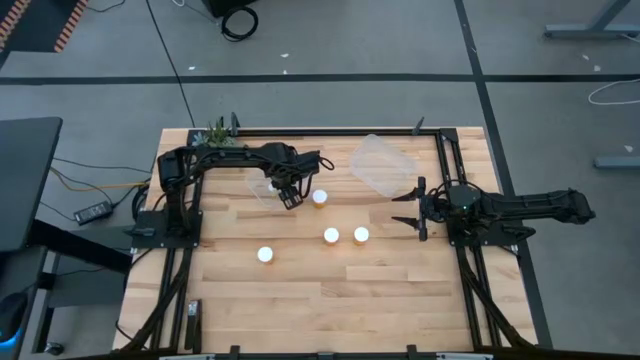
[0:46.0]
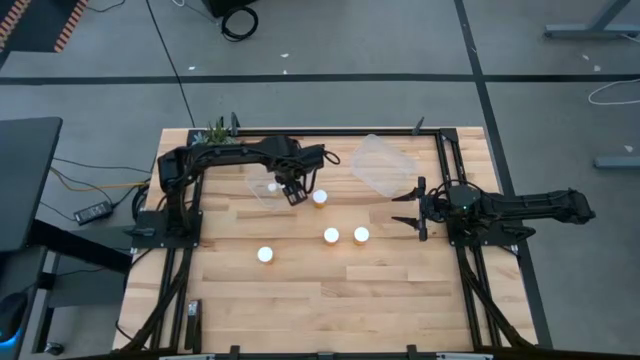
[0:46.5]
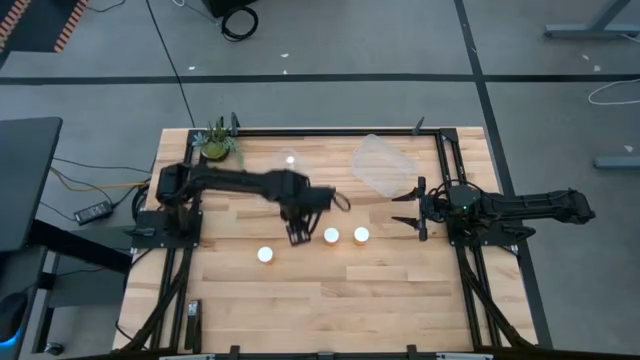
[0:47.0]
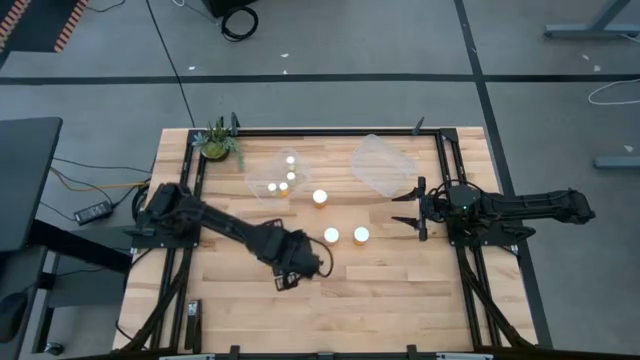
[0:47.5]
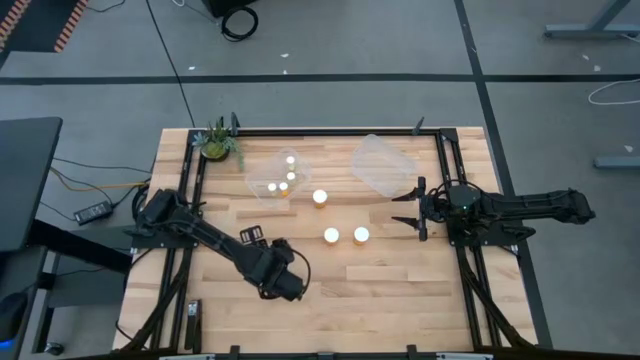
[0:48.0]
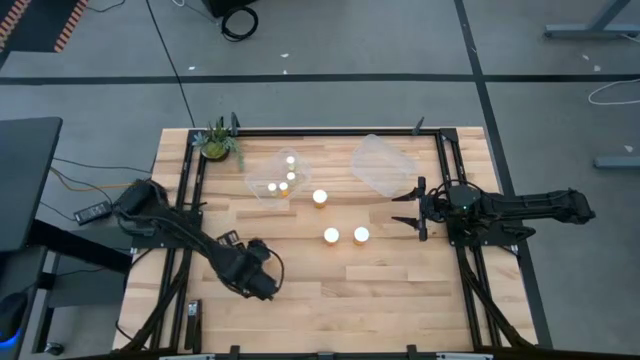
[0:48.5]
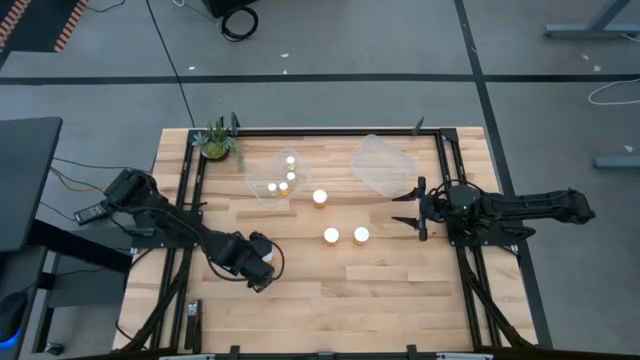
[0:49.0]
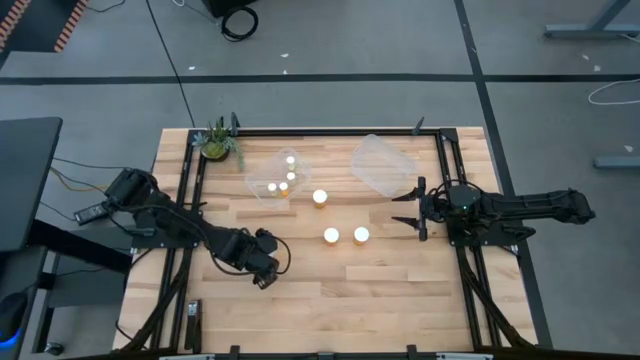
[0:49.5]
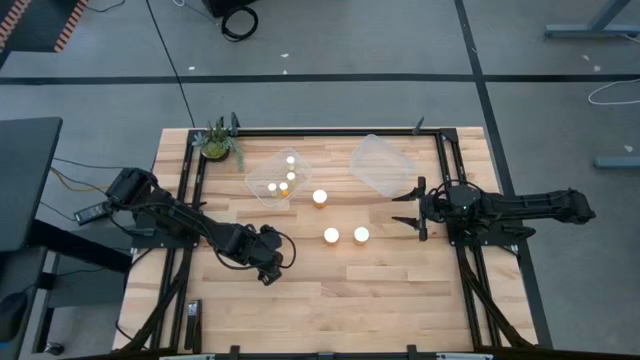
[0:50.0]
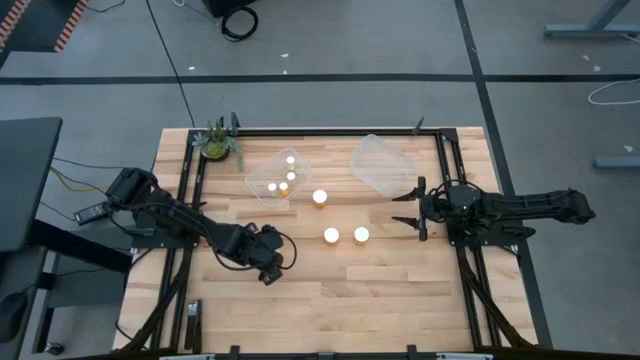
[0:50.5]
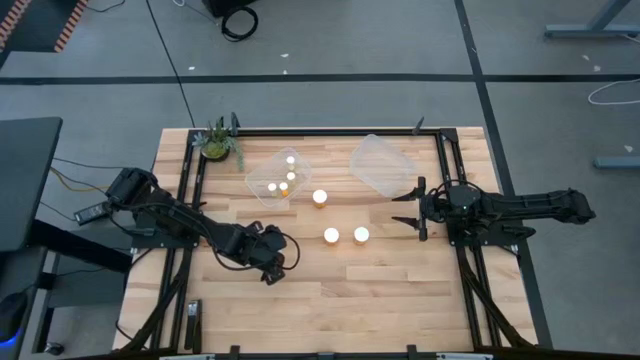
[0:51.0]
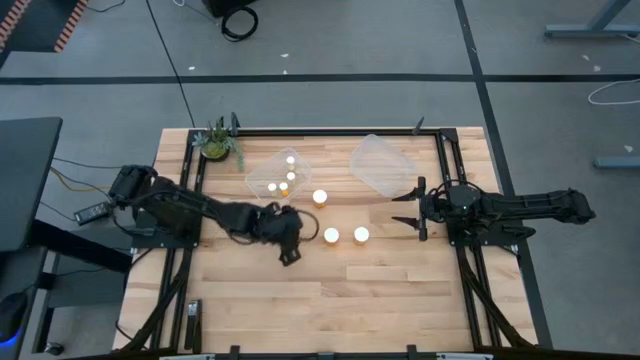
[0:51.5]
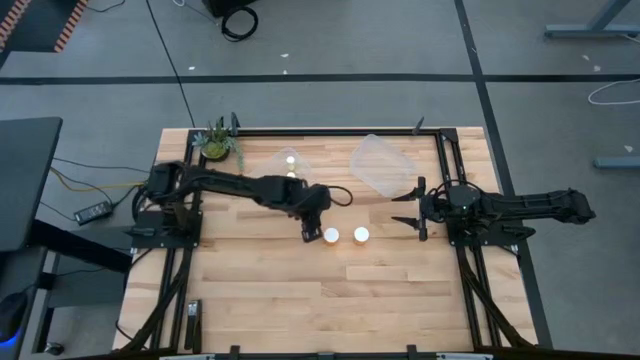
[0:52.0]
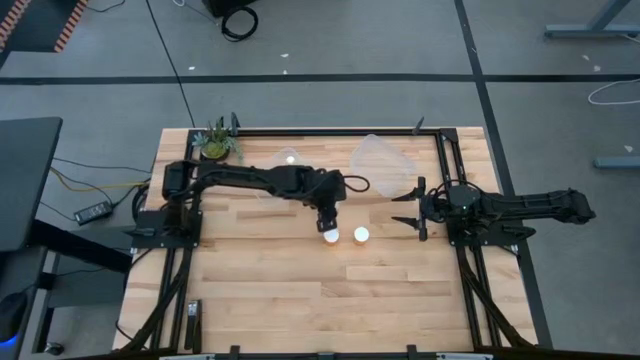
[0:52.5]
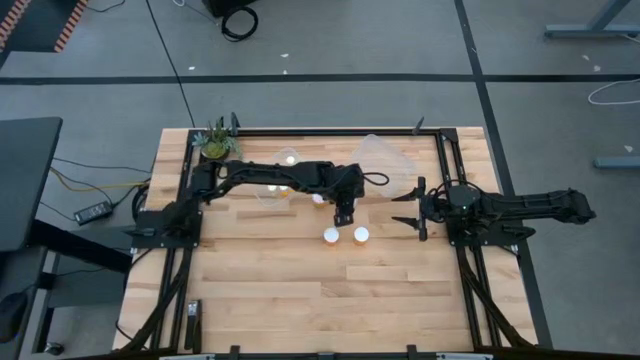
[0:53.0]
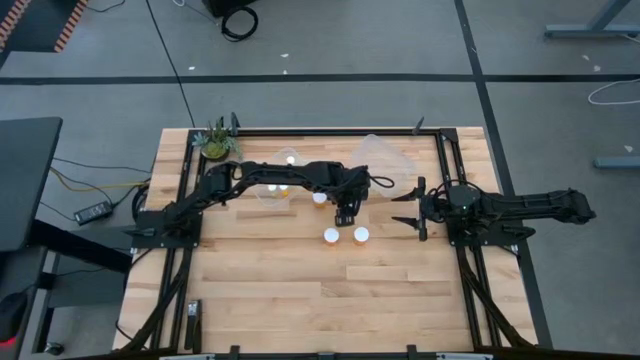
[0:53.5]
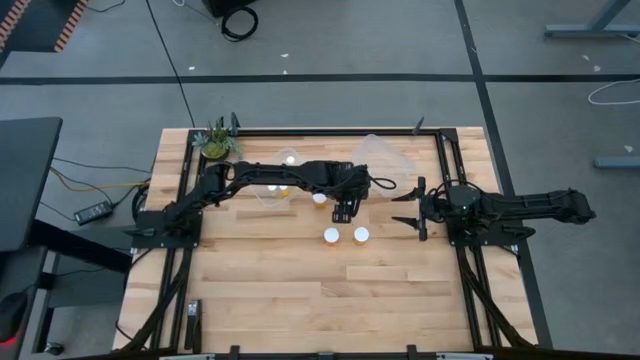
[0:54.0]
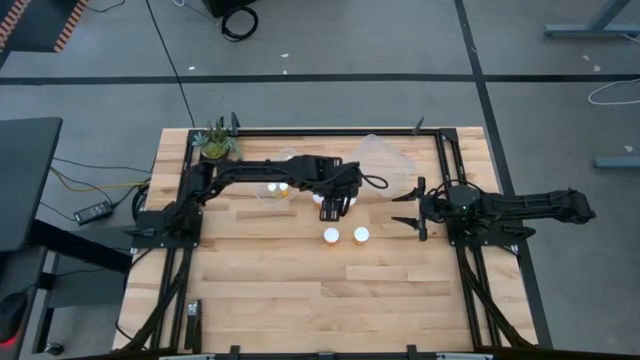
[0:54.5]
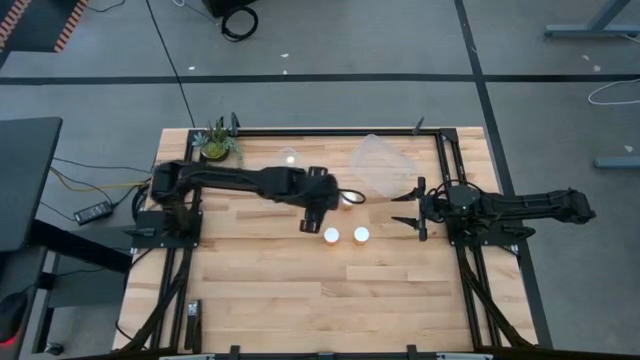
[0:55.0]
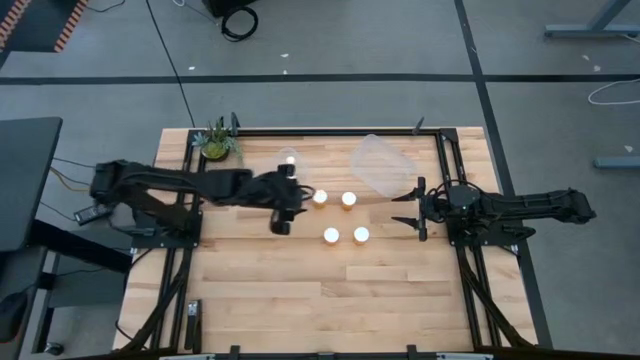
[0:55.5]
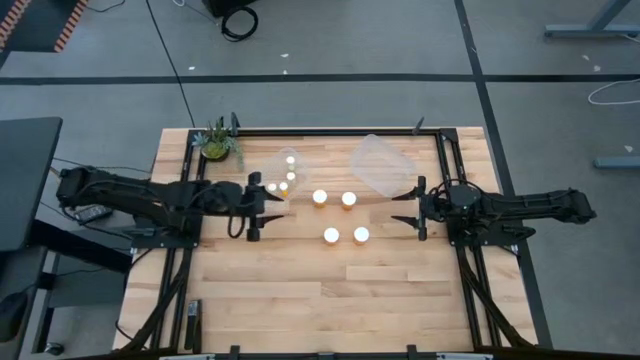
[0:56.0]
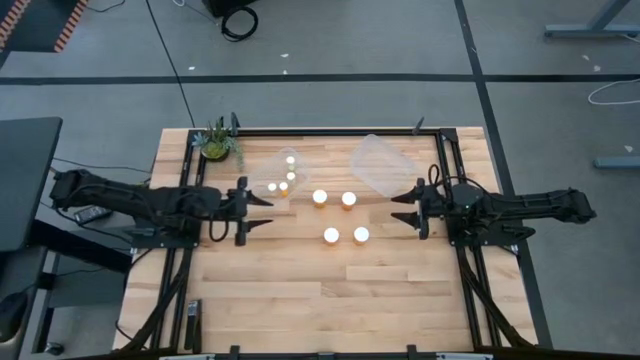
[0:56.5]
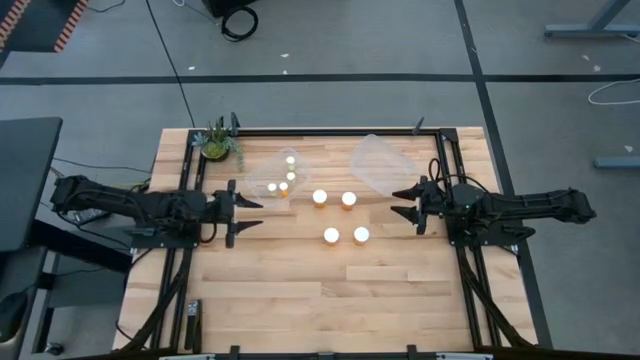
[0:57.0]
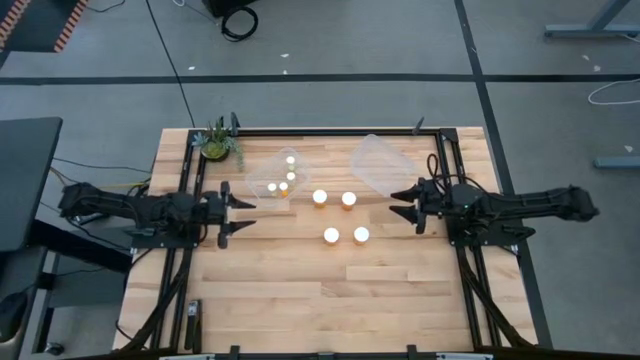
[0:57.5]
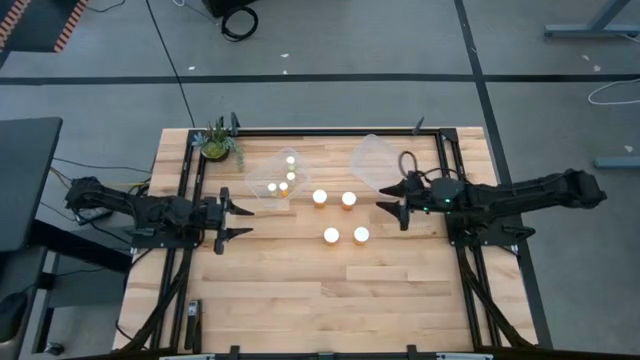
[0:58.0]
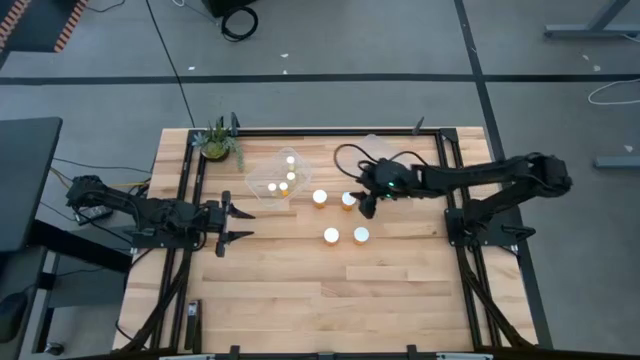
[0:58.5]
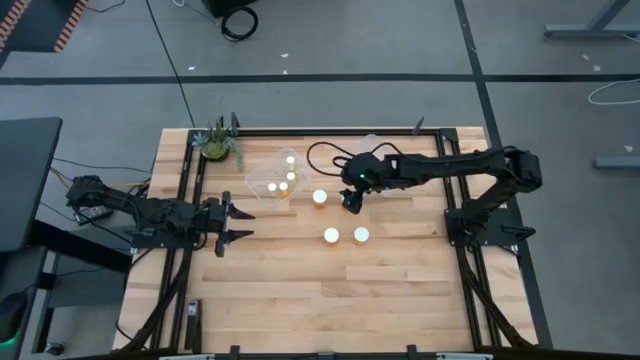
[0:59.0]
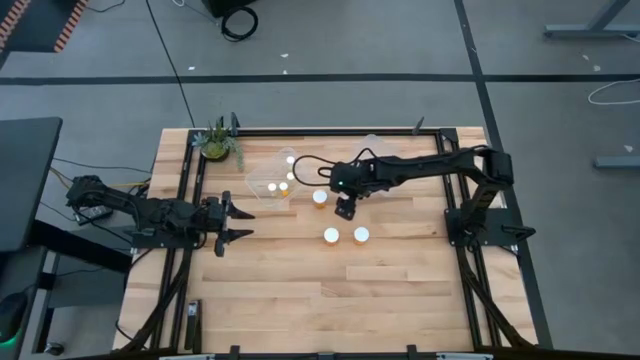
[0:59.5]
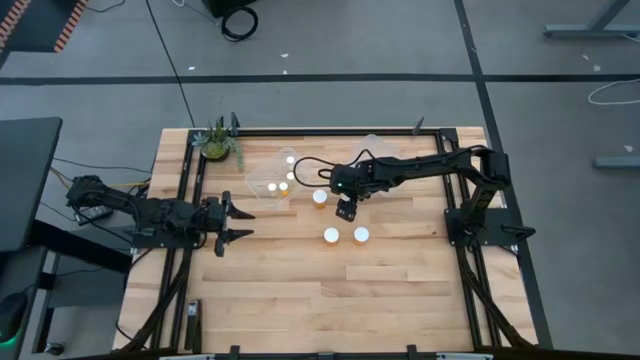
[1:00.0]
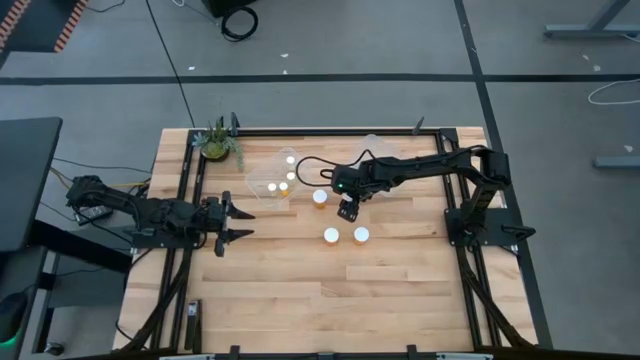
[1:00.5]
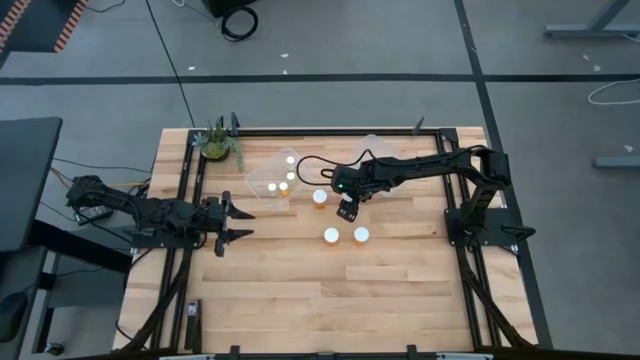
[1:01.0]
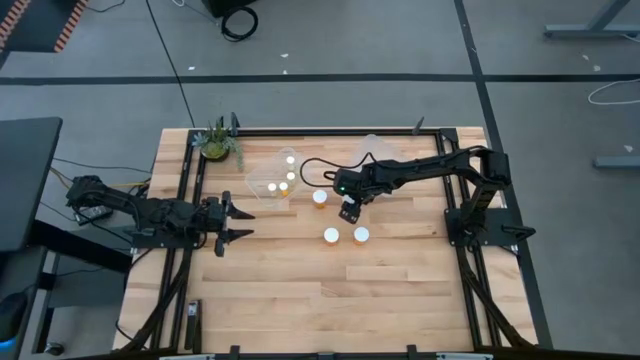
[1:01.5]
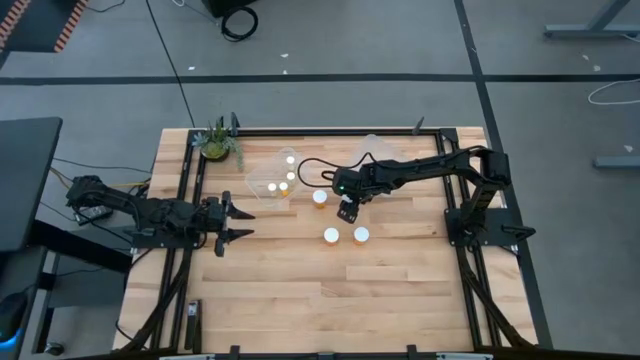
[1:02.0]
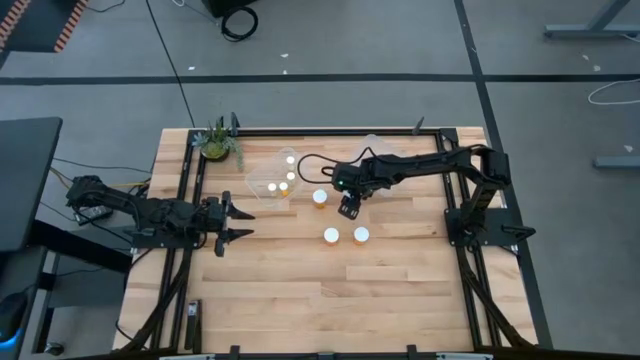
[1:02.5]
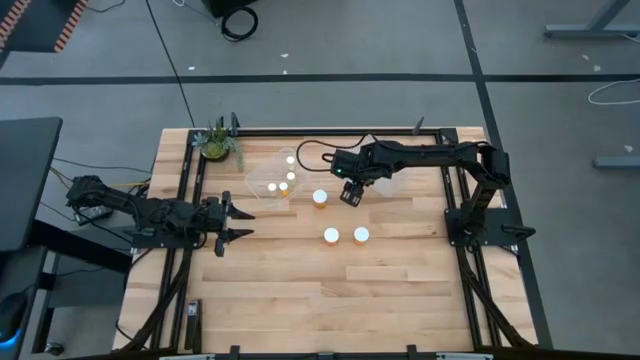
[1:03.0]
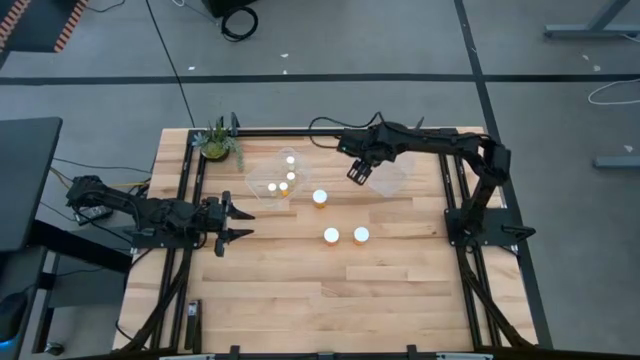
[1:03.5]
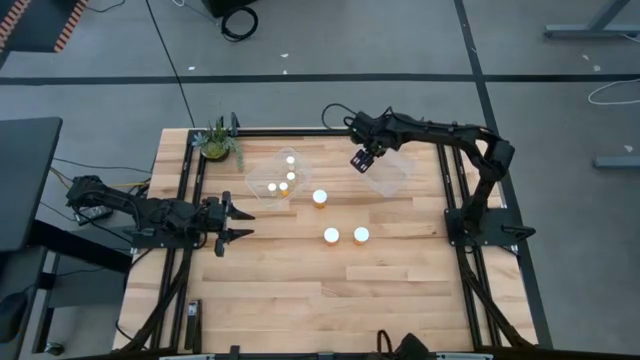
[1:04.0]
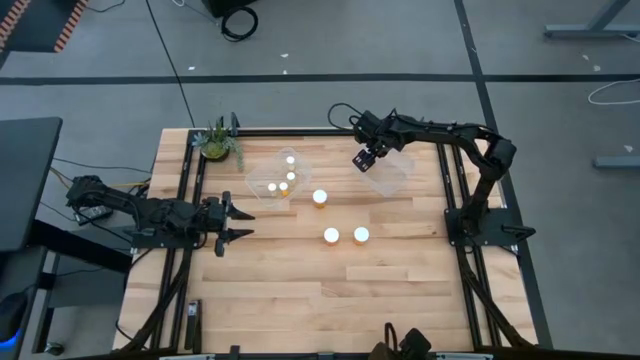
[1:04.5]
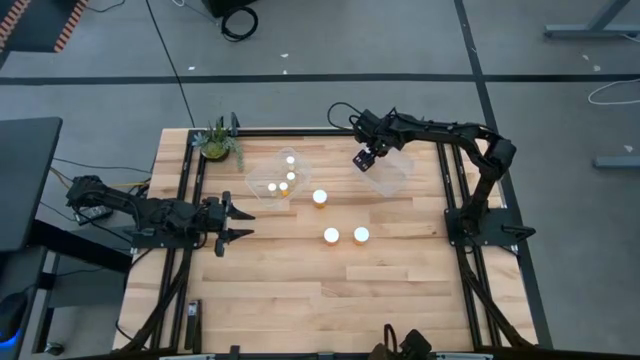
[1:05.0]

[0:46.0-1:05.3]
Task: Pick and place medicine bottles into bin by pill shape (circle, oval)
Put the top right big orange pill bottle into the right transparent bin

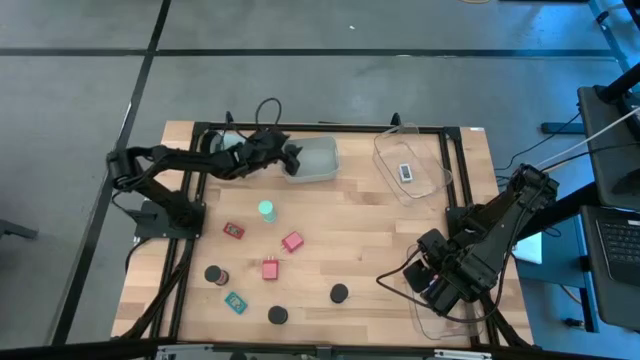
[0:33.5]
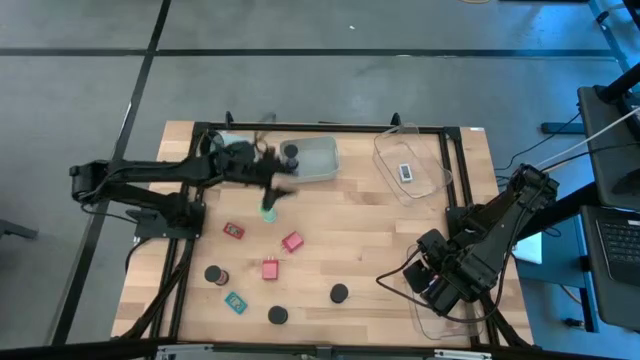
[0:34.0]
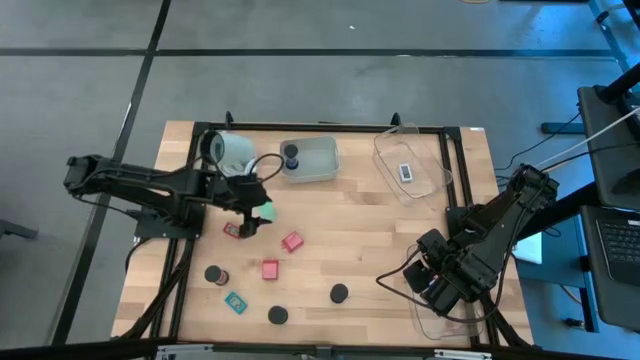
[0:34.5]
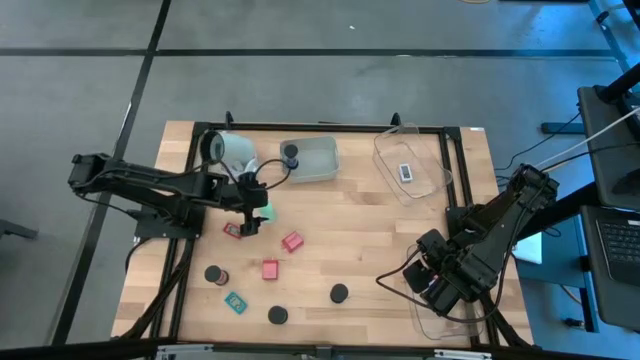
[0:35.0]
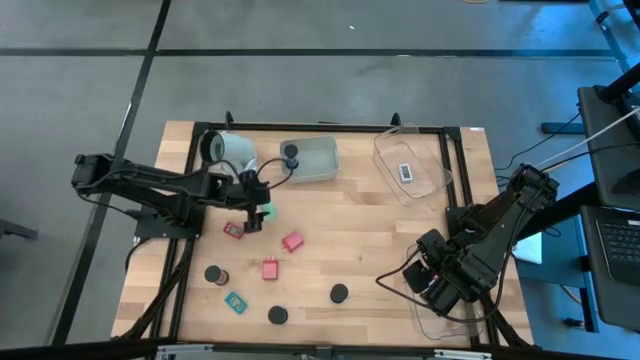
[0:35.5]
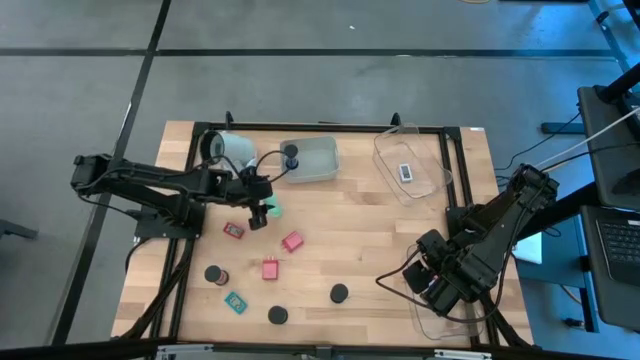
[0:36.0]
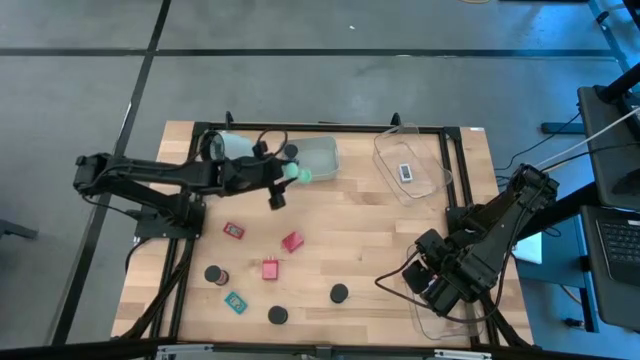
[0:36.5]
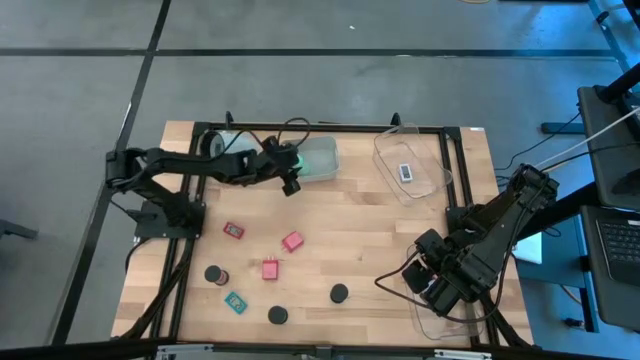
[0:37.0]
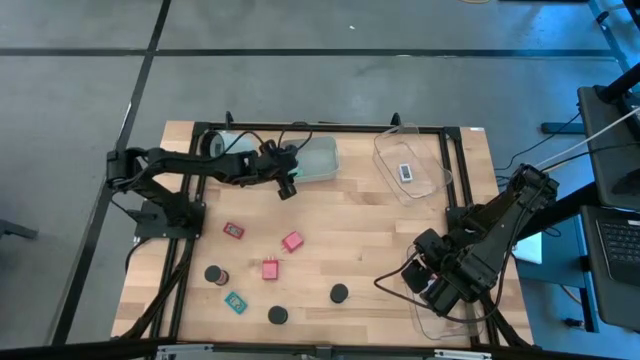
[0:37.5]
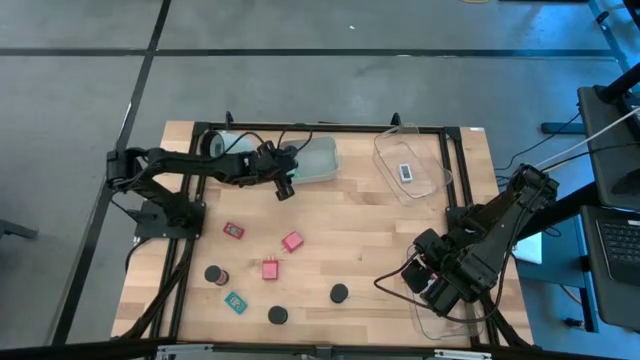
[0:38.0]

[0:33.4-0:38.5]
Task: Pick & Place Office items
Put the green hourglass into the gray bin
